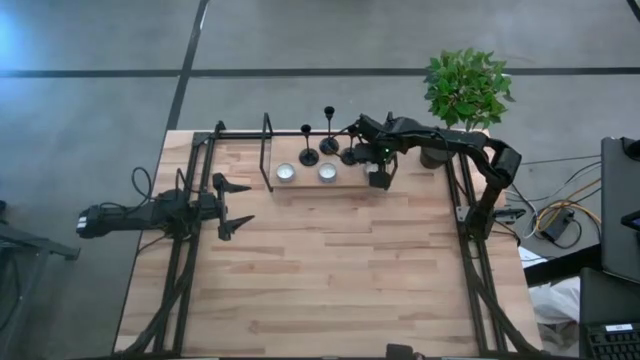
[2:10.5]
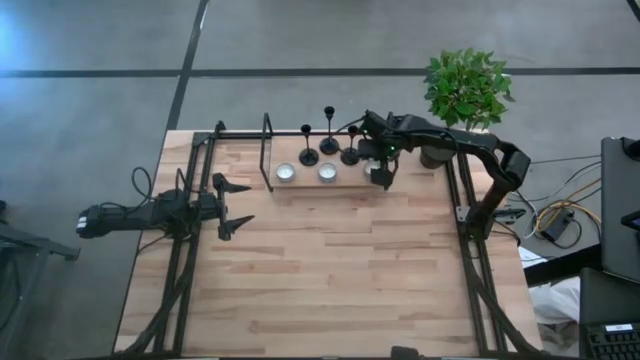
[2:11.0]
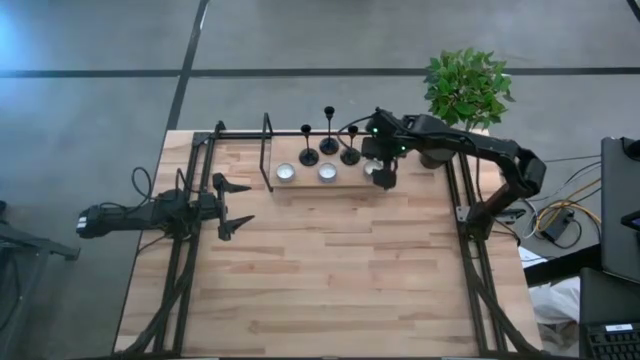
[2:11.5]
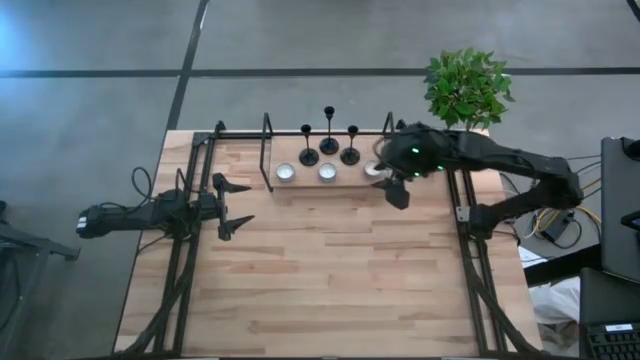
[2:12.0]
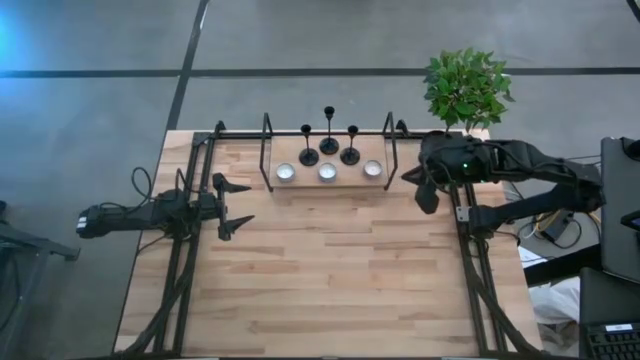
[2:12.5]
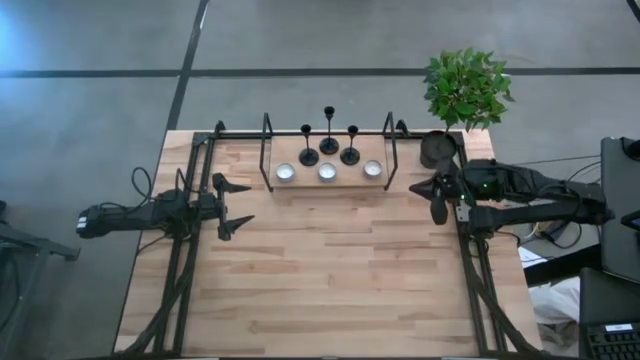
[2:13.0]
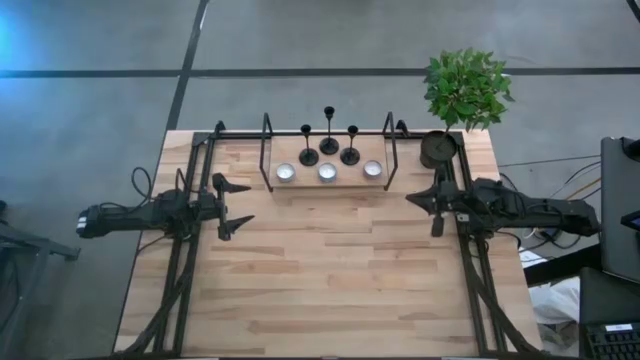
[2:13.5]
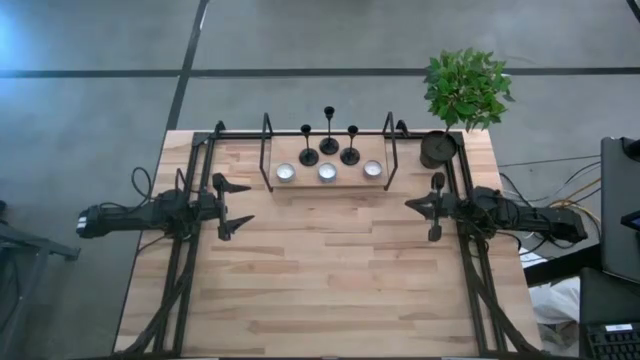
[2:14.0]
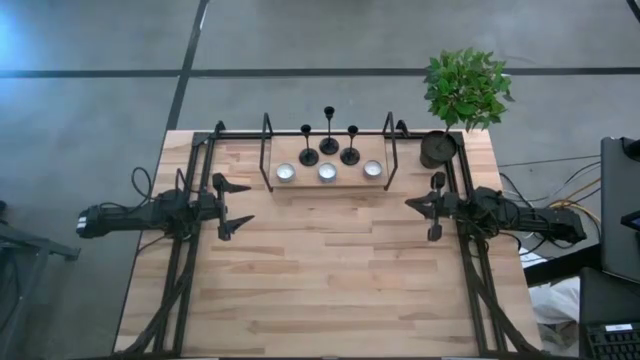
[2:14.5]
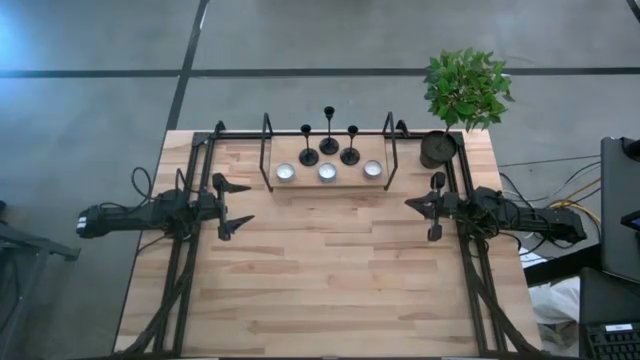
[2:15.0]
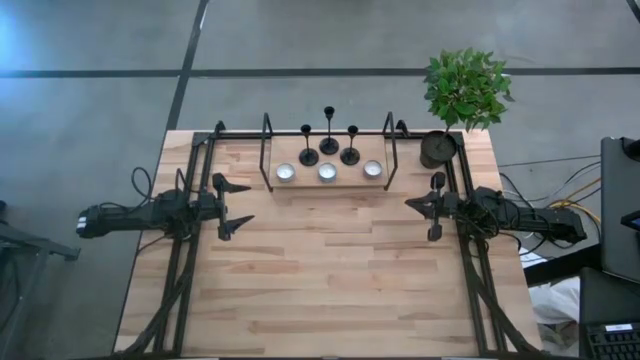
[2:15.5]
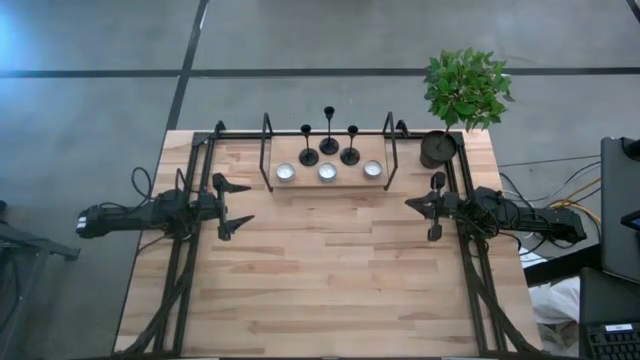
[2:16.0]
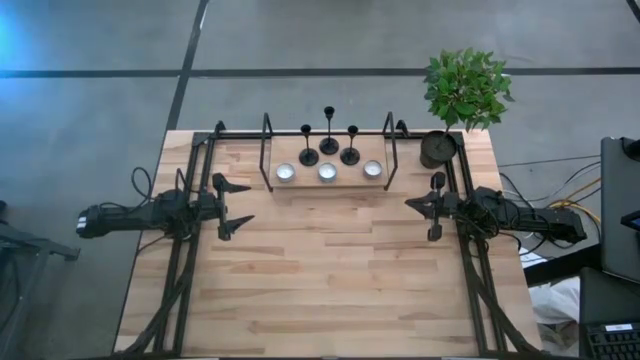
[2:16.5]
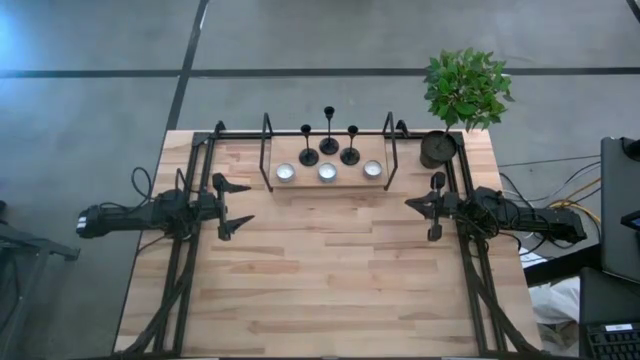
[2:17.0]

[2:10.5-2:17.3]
Task: Pick & Place candle stick holders
Return to Home Position

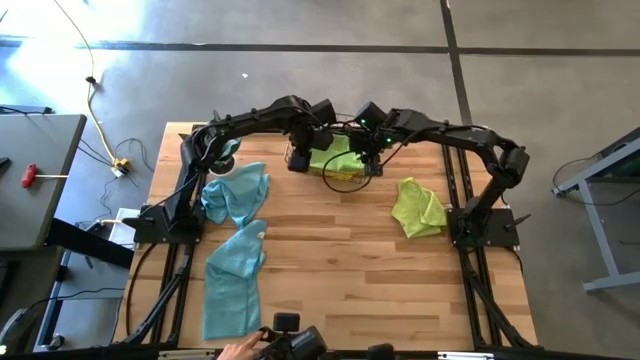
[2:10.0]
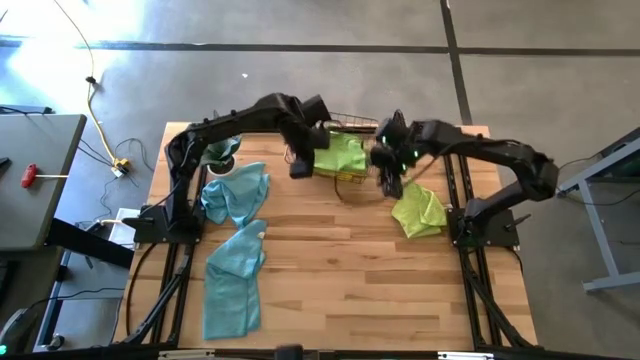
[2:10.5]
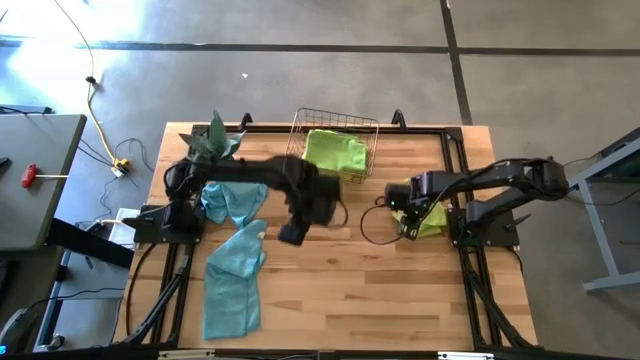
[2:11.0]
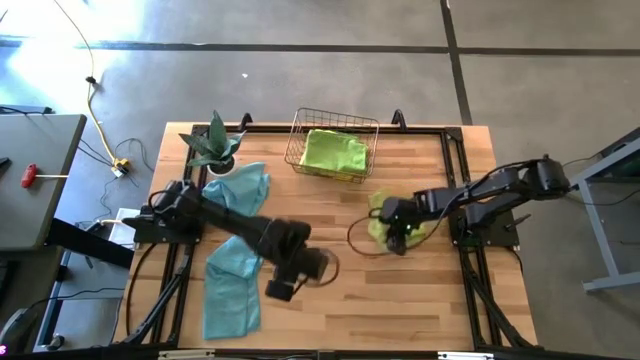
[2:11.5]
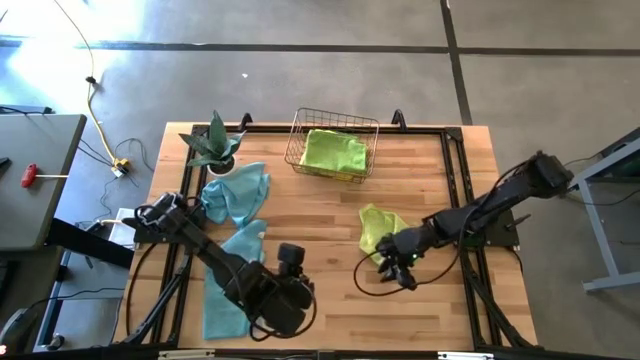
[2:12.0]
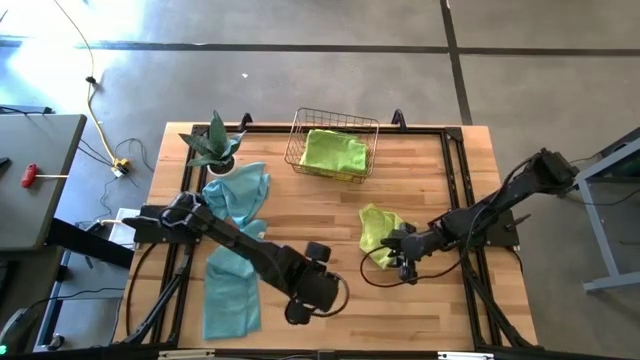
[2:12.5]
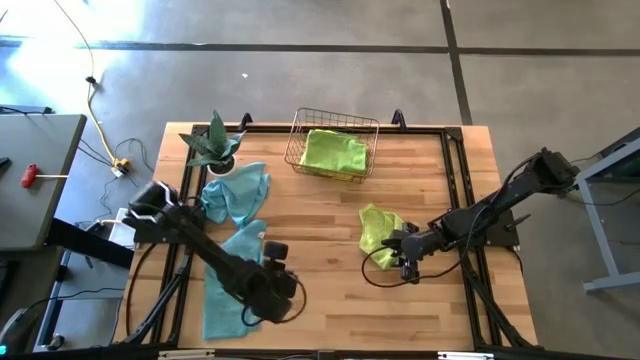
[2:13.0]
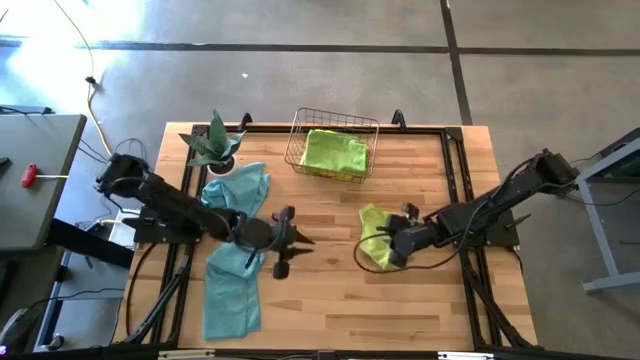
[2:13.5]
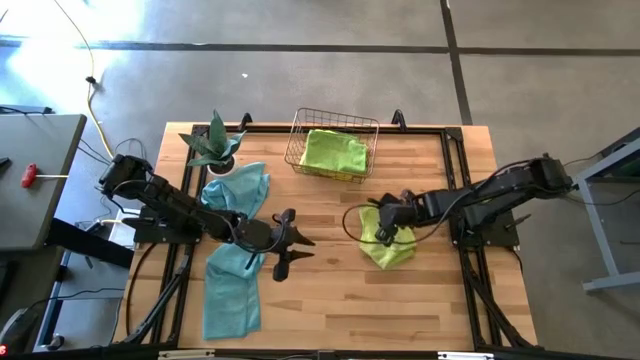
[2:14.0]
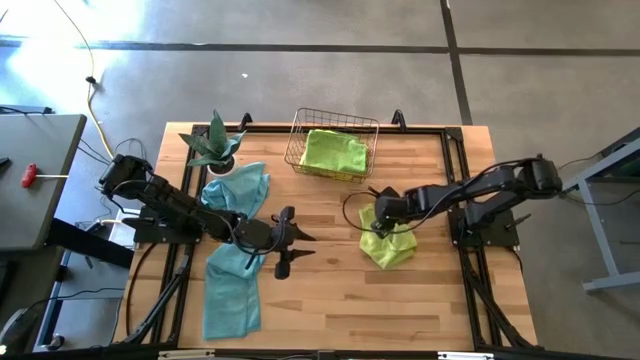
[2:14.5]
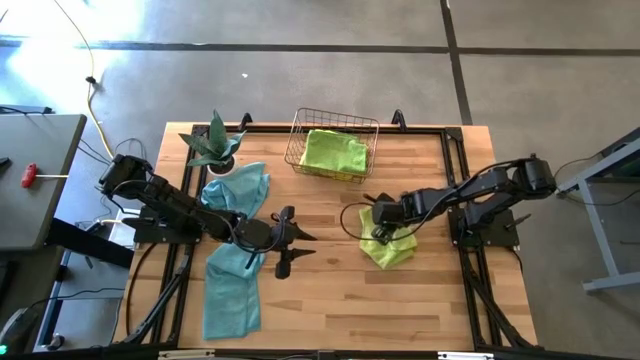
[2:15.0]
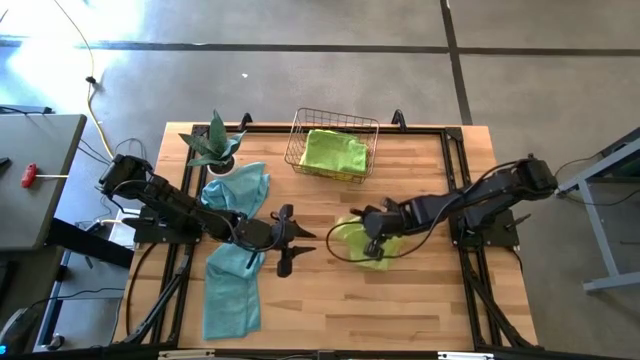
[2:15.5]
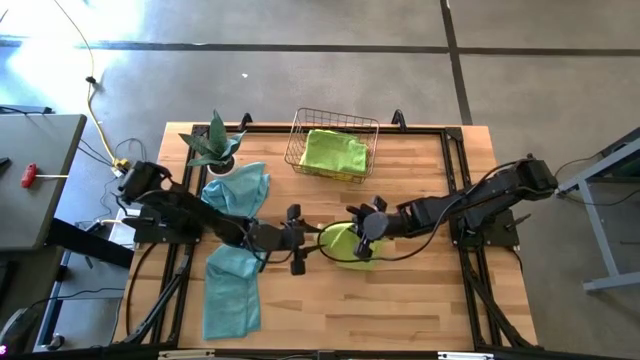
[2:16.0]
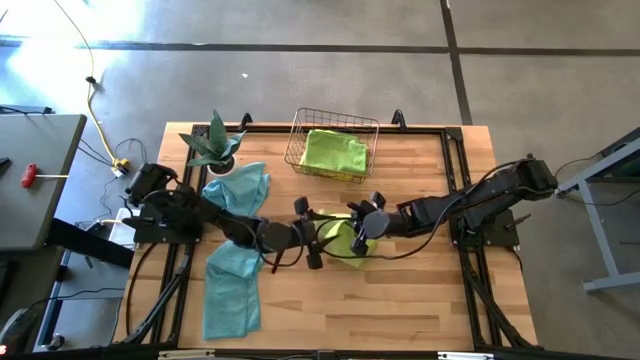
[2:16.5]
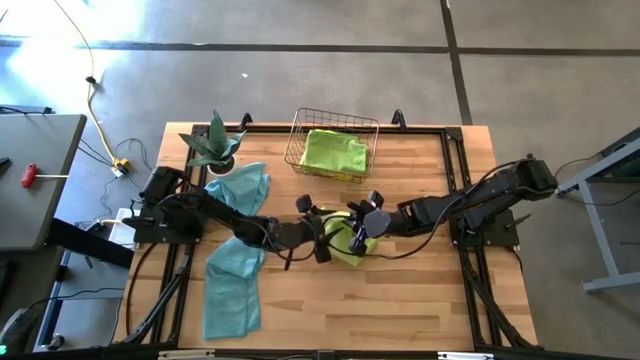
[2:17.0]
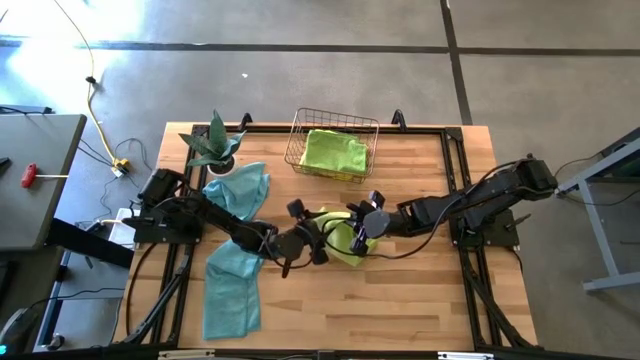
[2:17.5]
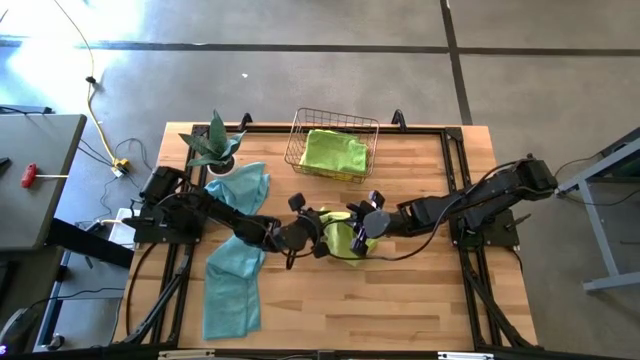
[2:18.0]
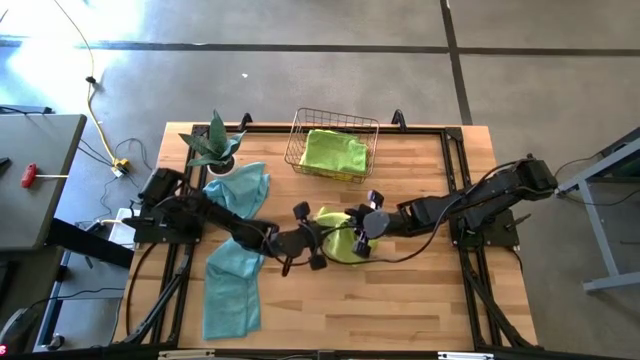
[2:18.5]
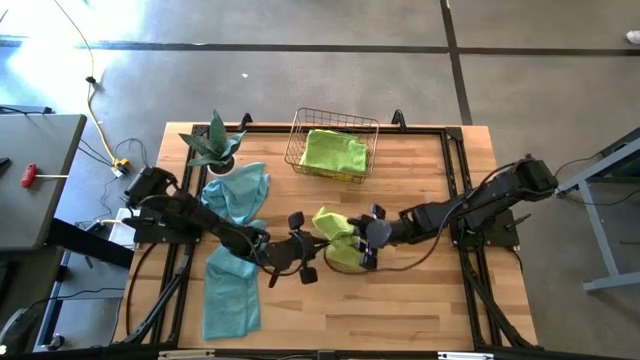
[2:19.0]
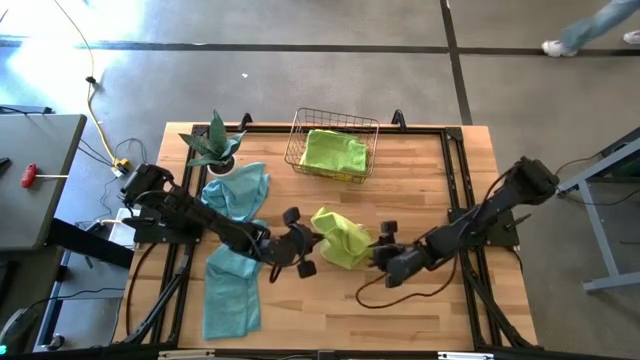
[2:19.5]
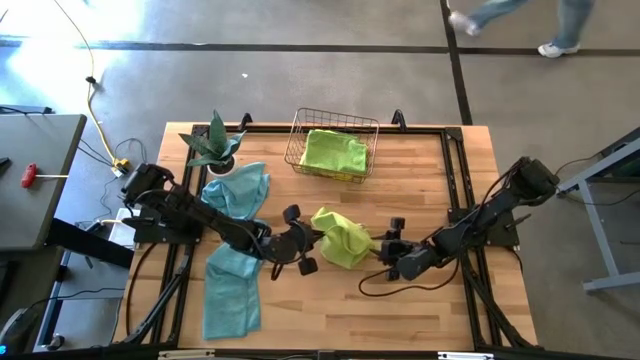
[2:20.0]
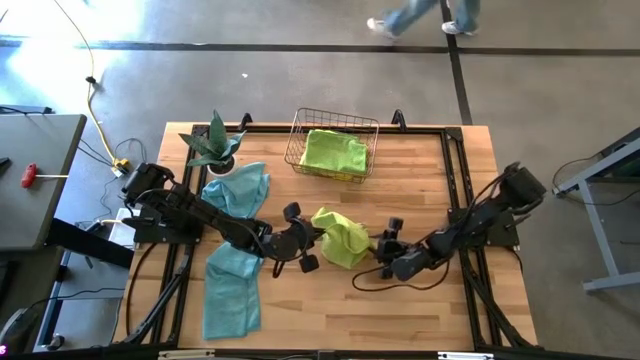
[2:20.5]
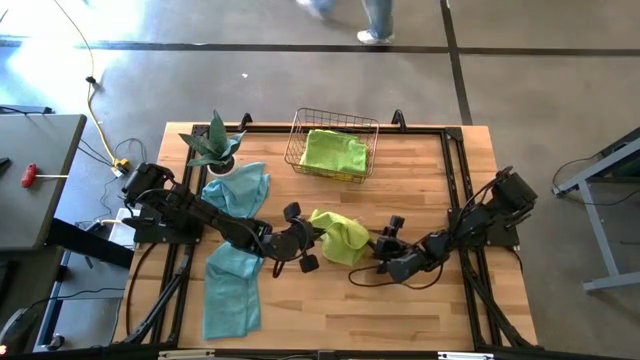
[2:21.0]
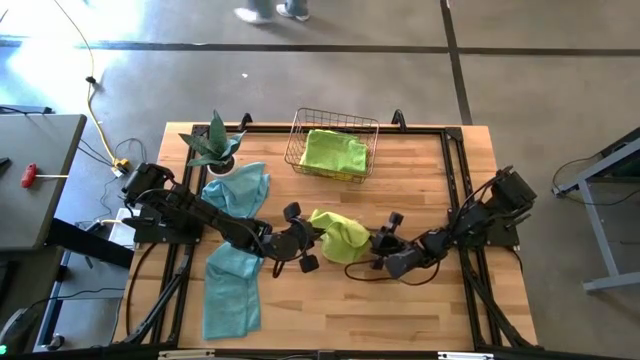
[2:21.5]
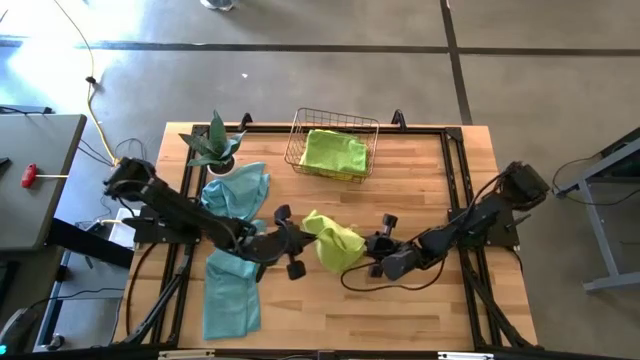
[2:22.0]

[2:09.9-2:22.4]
Task: Fold microfiber towels
Fold the light green microfiber towel
